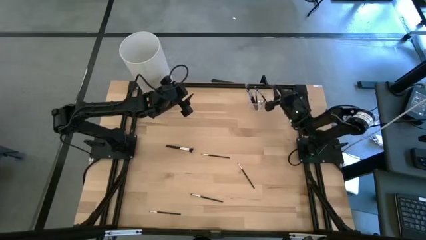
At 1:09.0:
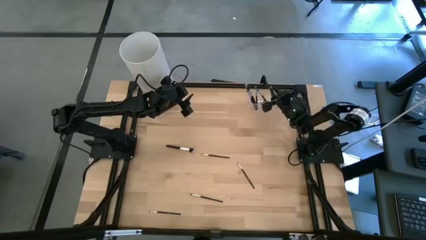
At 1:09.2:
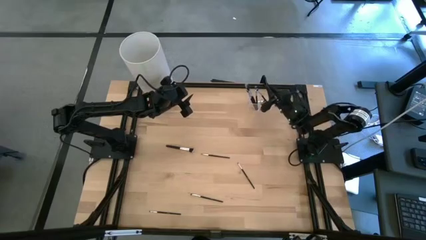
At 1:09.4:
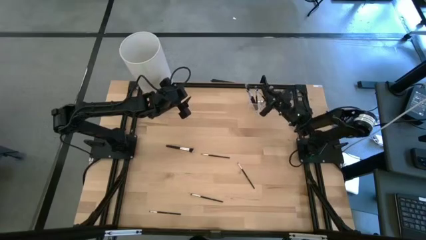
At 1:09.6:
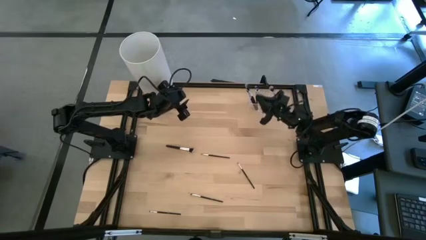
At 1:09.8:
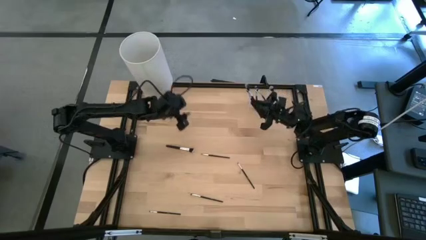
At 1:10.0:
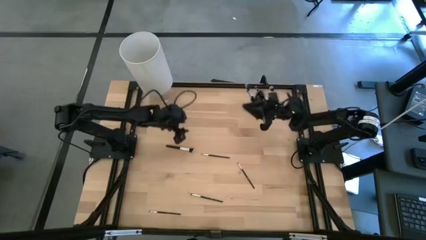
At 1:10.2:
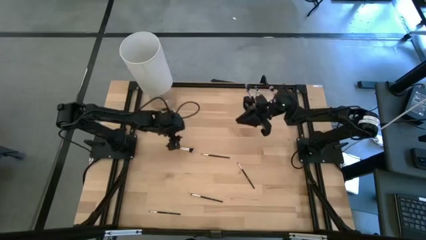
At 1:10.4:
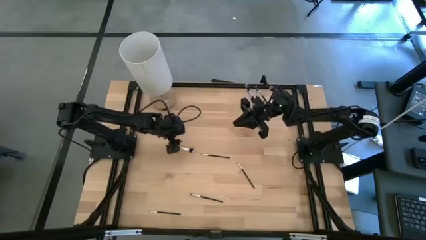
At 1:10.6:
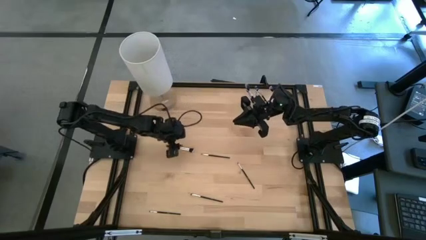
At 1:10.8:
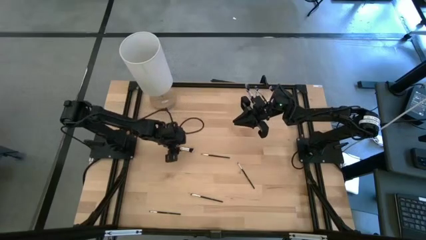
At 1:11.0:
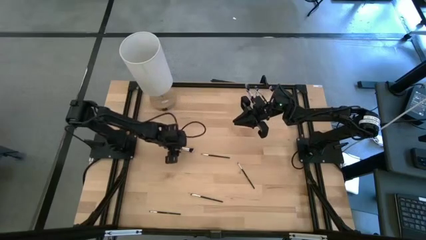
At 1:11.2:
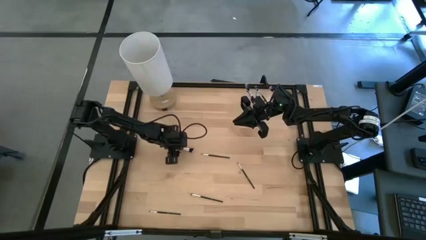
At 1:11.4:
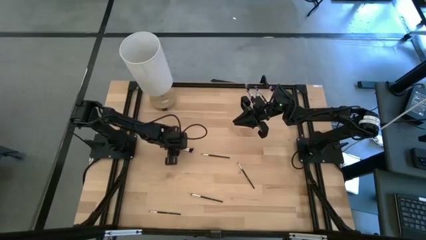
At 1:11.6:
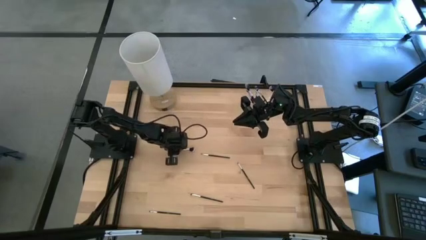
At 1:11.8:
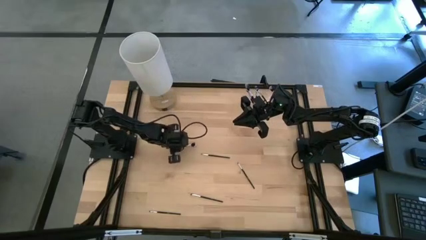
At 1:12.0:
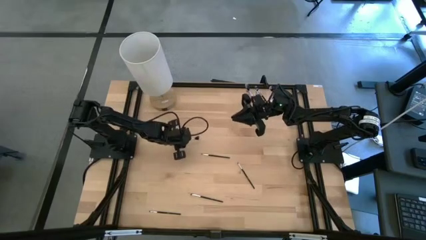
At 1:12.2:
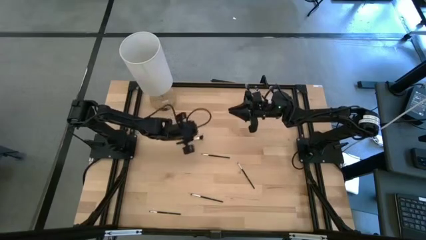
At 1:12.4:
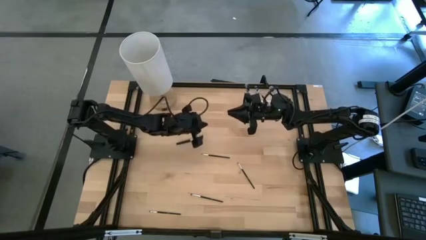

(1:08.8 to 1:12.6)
Task: Put items in baskets/containers
Put the powder brush into the right side of the transparent organizer

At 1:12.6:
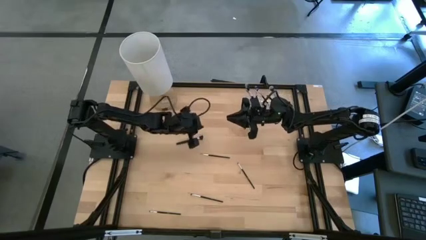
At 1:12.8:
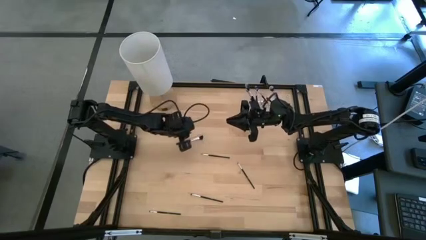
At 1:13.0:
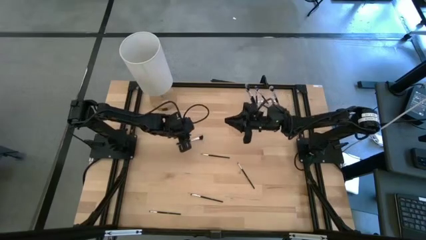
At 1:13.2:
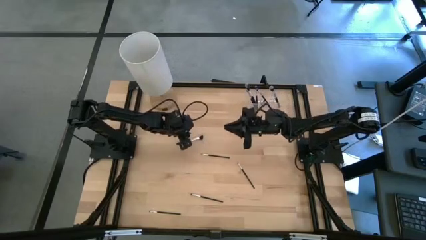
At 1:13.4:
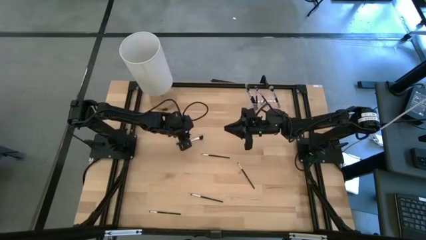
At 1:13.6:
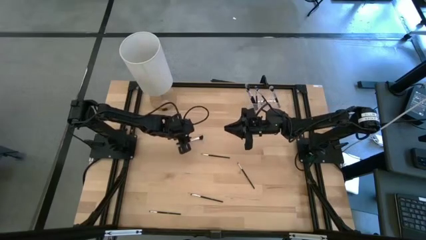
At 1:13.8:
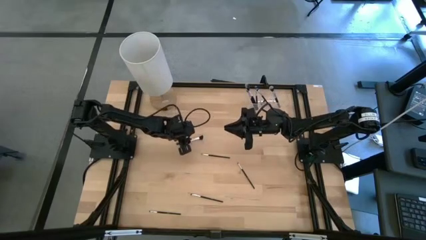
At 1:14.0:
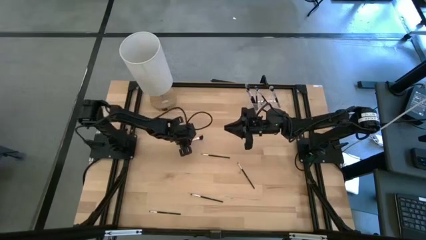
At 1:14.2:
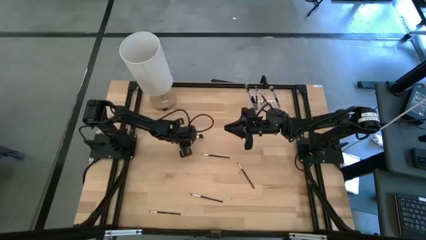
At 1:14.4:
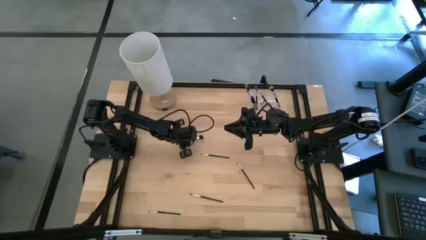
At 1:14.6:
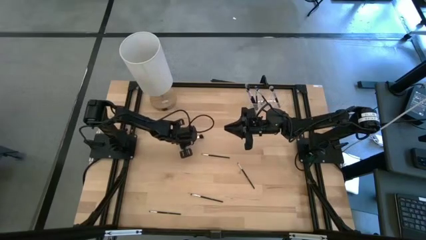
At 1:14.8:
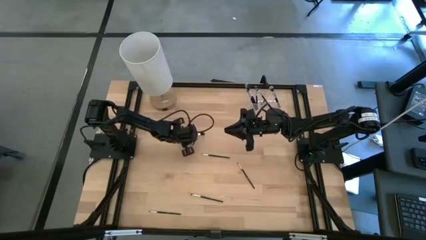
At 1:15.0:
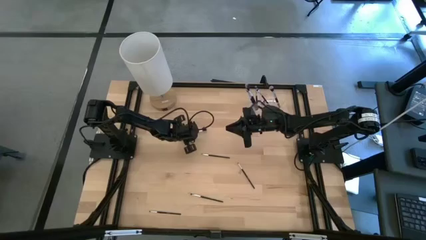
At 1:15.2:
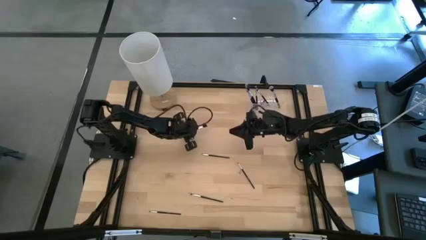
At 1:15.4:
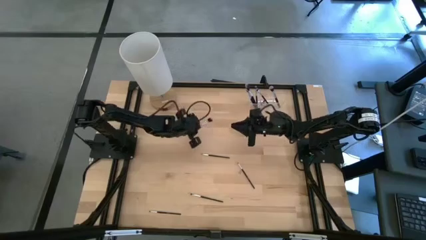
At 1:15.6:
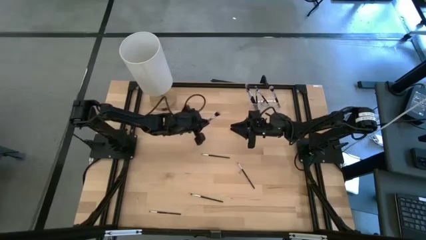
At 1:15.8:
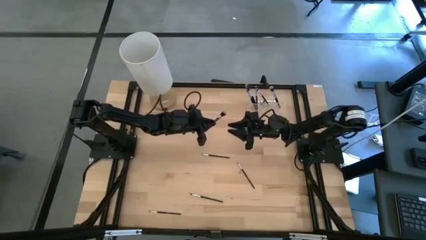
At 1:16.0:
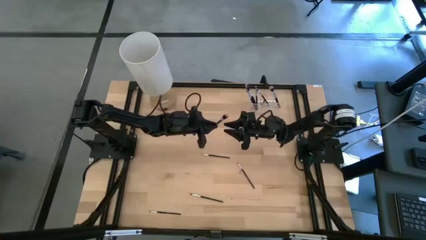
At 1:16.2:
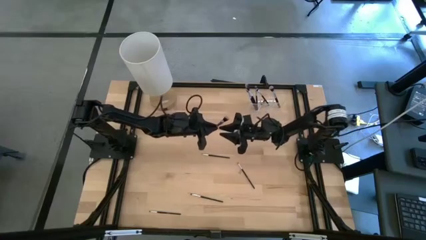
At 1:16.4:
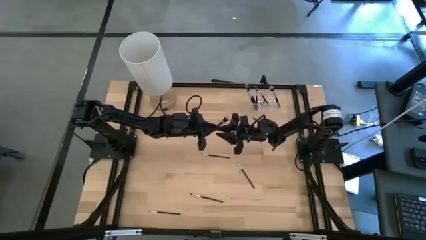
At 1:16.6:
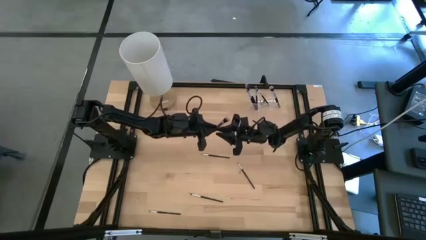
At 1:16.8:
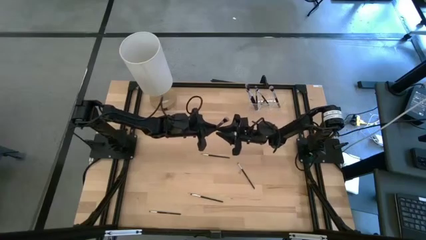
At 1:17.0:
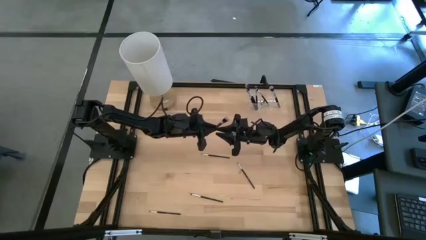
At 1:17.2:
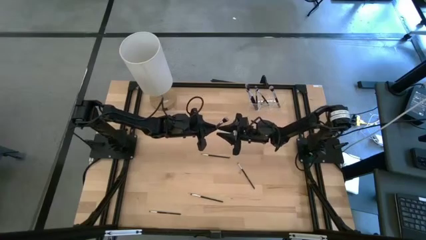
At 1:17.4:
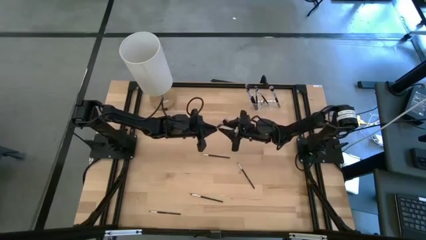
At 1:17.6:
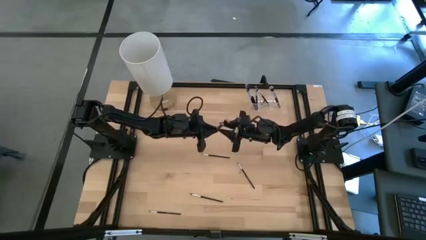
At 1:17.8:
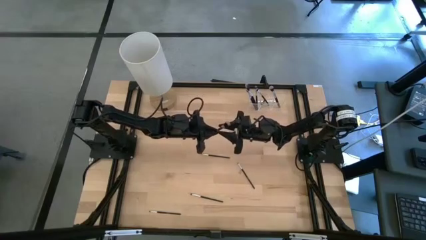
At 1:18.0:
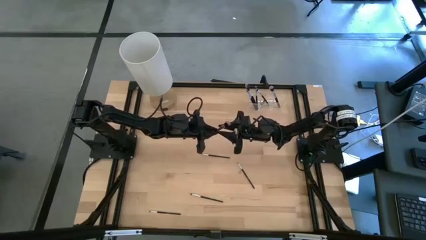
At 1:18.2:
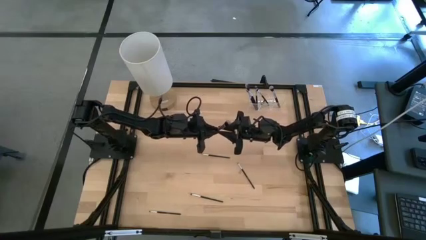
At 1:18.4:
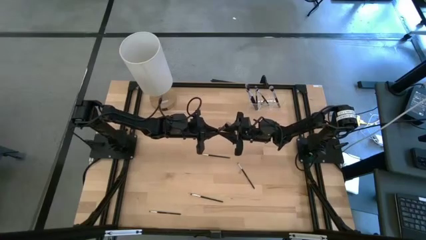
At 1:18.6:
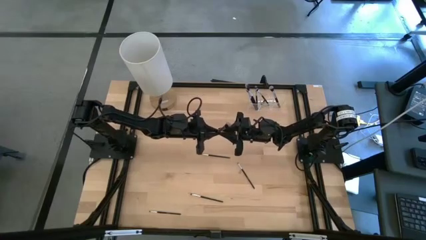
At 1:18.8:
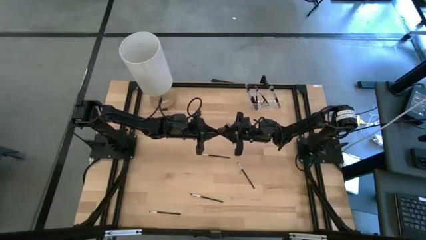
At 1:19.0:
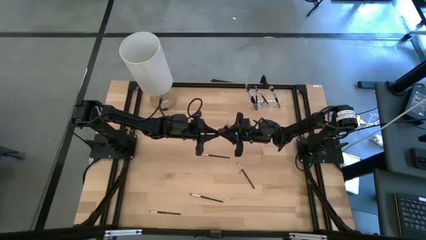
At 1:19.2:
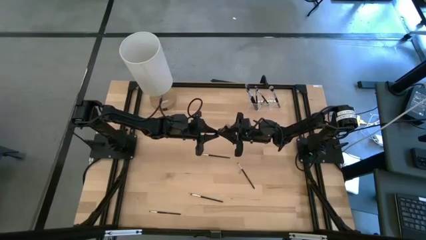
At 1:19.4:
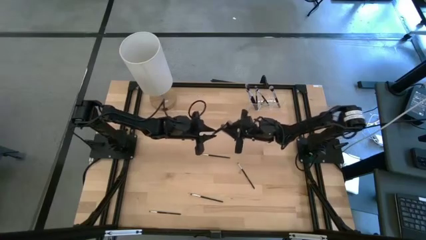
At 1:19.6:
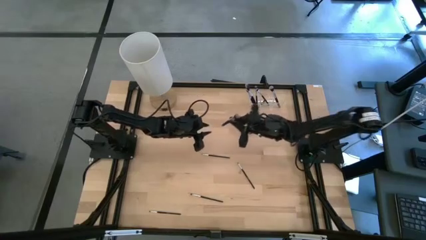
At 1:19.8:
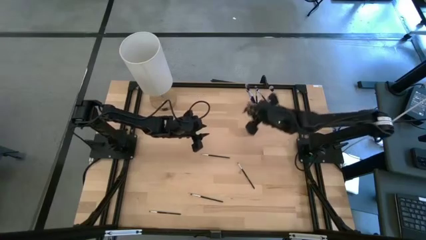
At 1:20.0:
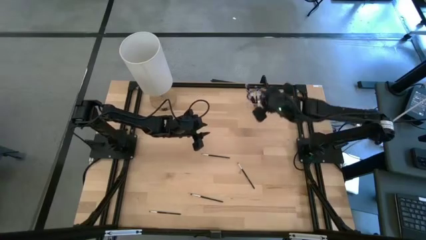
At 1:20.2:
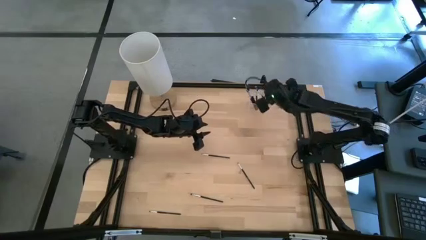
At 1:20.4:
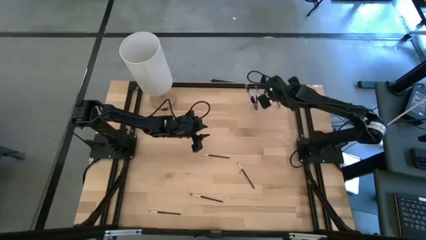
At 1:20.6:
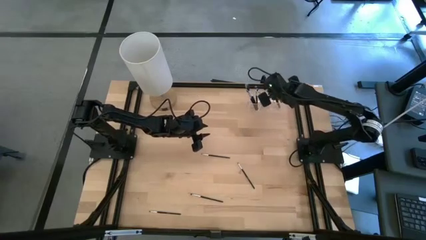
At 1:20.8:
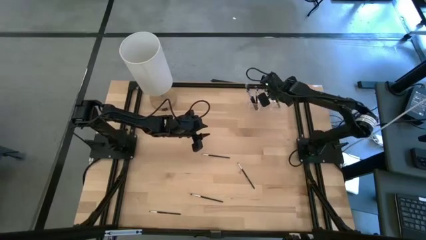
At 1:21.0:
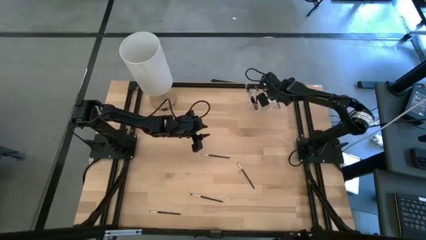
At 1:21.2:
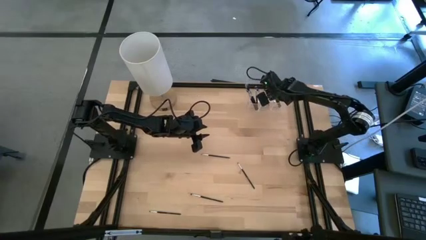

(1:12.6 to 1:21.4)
Put the powder brush into the right side of the transparent organizer

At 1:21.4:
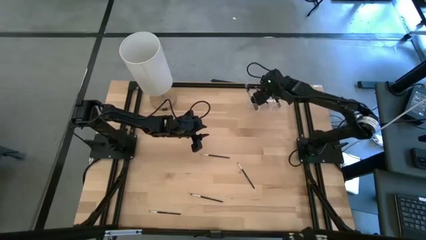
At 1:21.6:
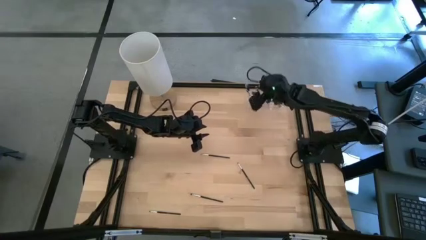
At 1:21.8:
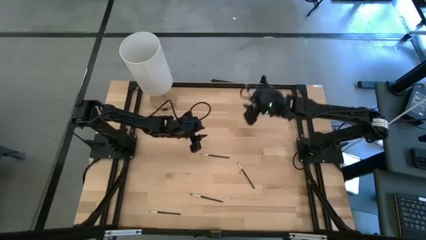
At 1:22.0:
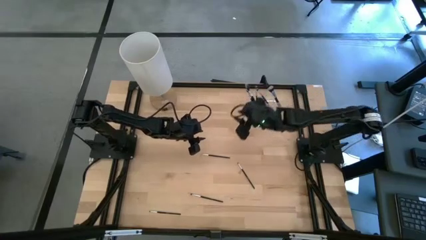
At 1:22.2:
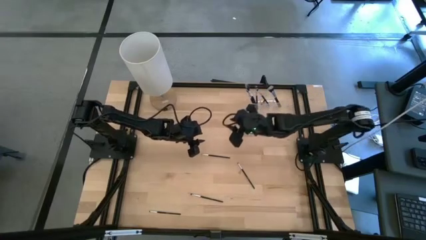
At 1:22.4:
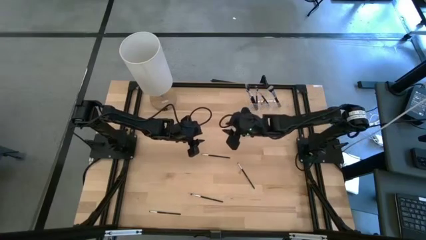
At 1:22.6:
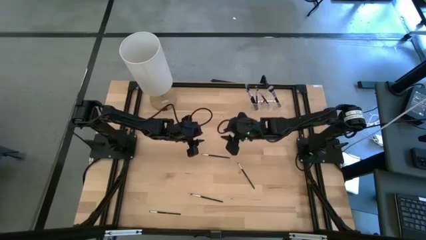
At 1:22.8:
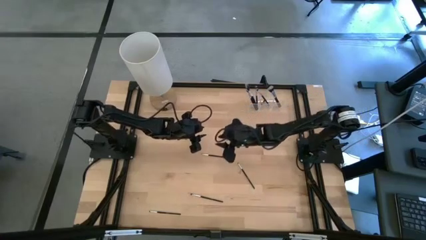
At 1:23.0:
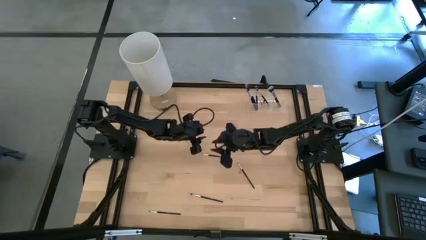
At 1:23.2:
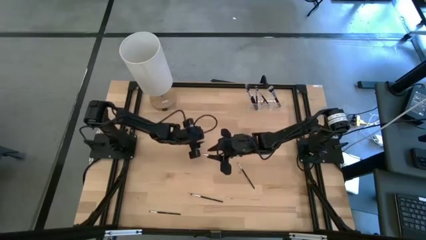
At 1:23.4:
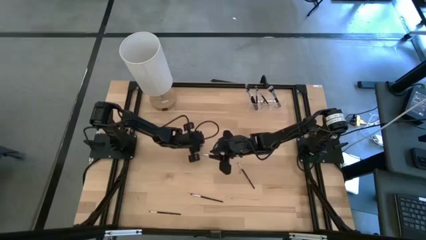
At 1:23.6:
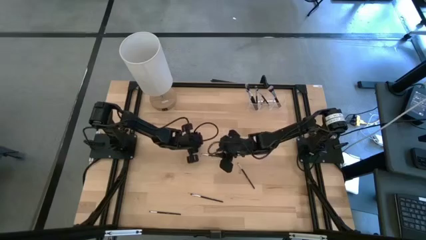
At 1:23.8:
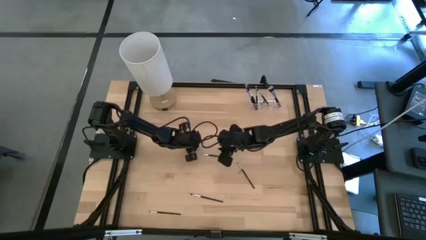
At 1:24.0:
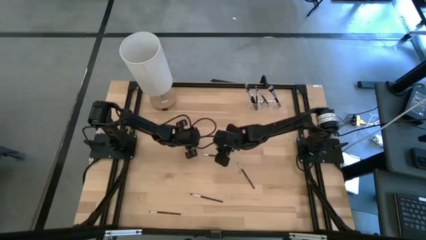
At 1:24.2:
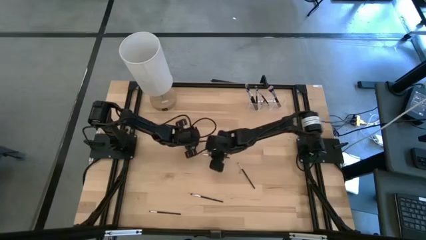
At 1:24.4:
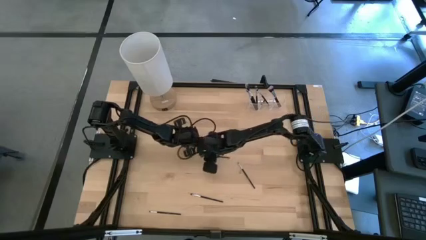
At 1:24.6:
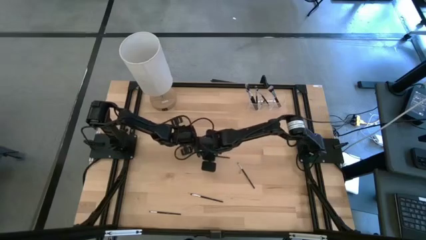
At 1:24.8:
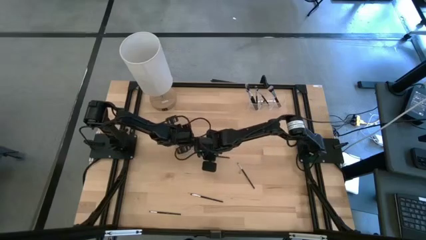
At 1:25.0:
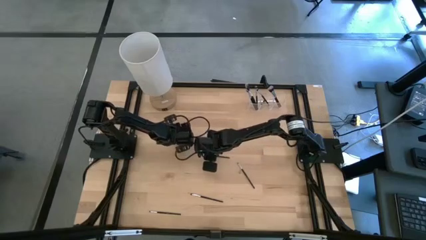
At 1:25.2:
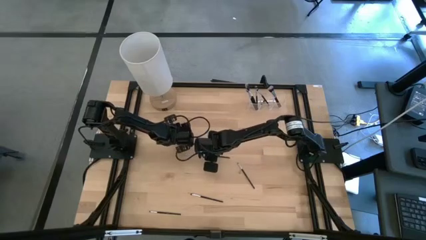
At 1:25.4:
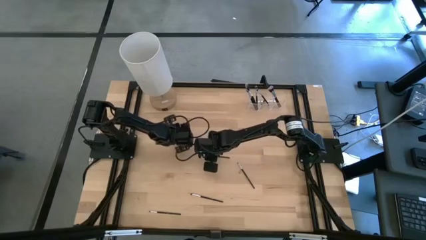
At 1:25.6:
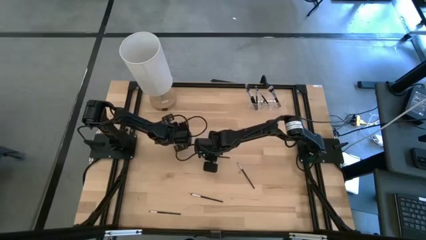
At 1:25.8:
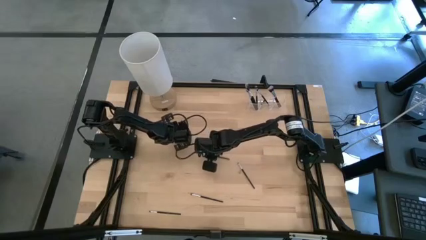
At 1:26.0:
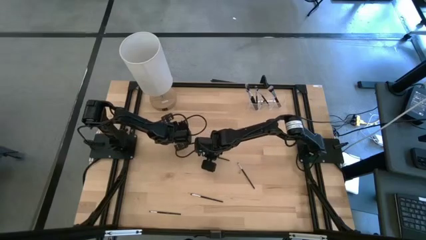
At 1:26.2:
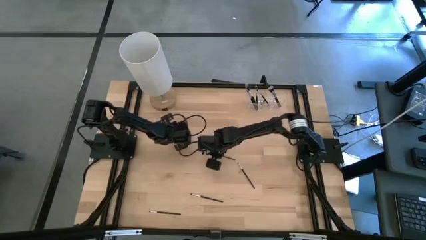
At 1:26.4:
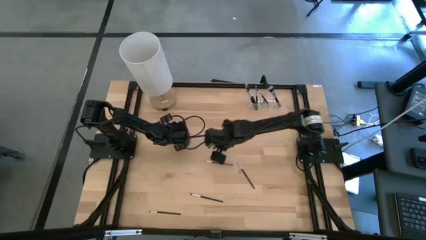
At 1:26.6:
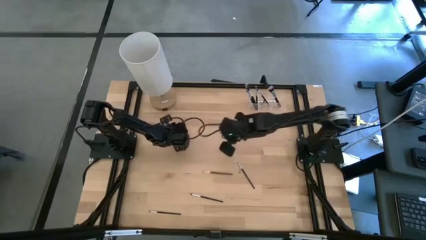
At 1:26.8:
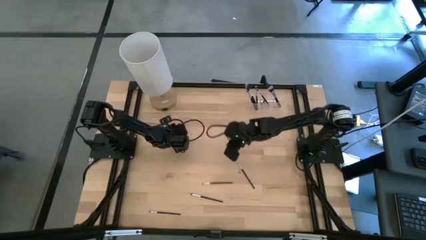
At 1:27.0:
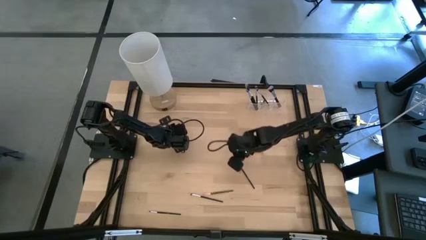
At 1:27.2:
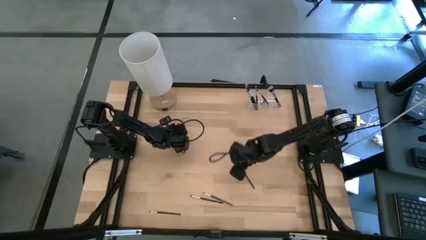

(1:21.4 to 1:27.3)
Put the eyeshadow brush into the middle of the transparent organizer
